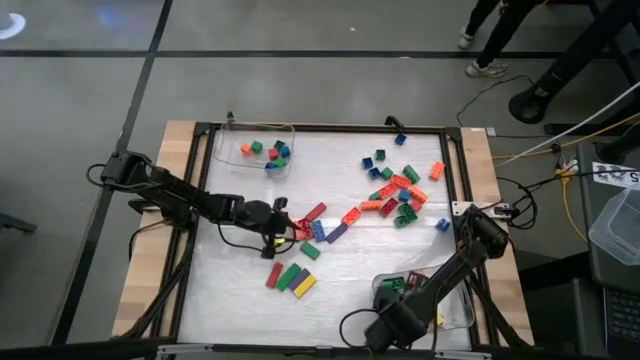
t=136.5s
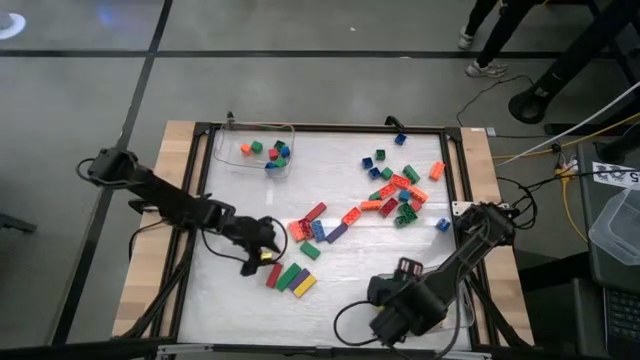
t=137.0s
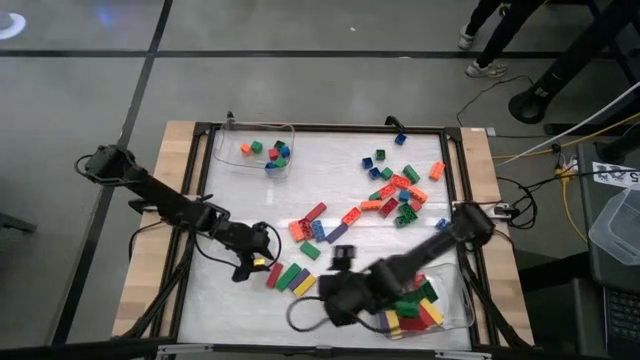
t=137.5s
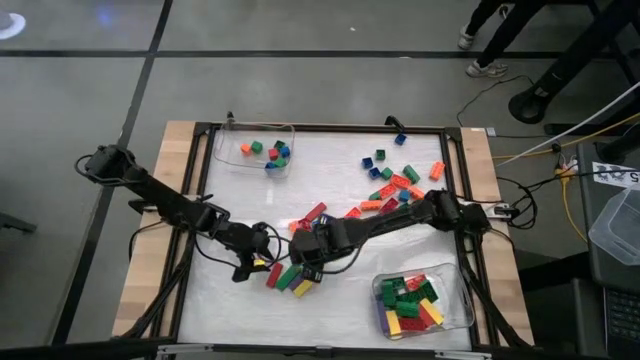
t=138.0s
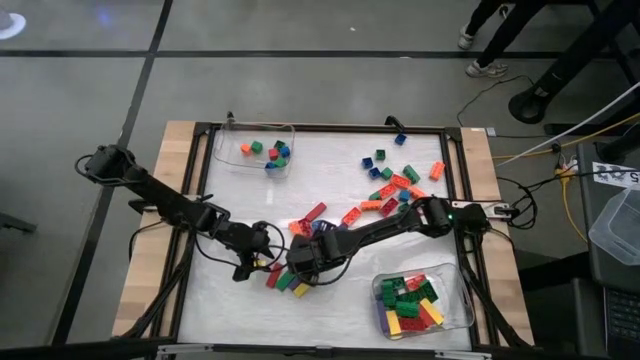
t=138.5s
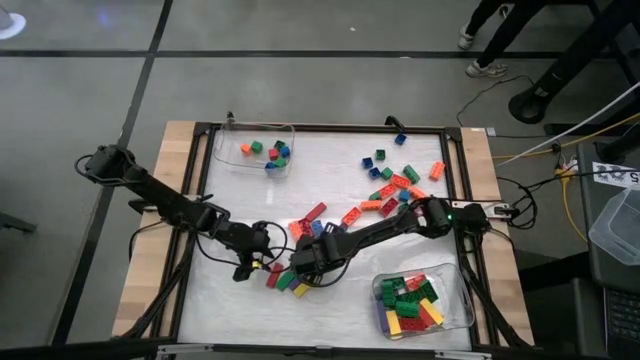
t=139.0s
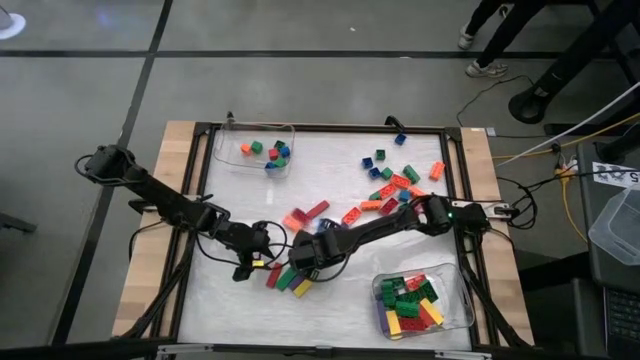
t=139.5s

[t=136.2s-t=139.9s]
Task: Sort blocks by size
Put the rectangular green block into the bottom transparent bin

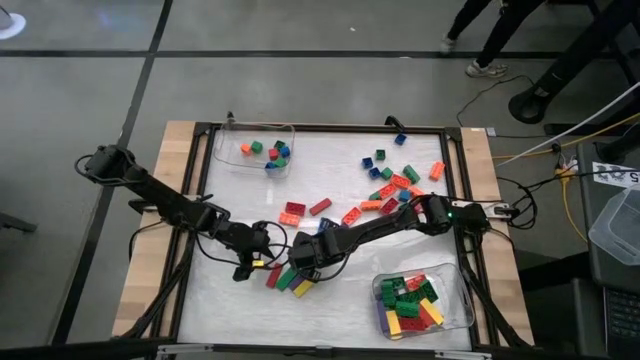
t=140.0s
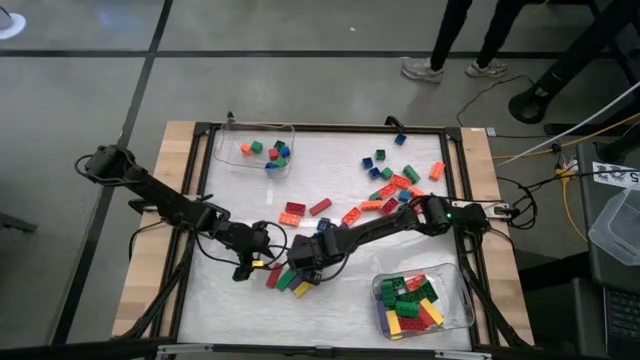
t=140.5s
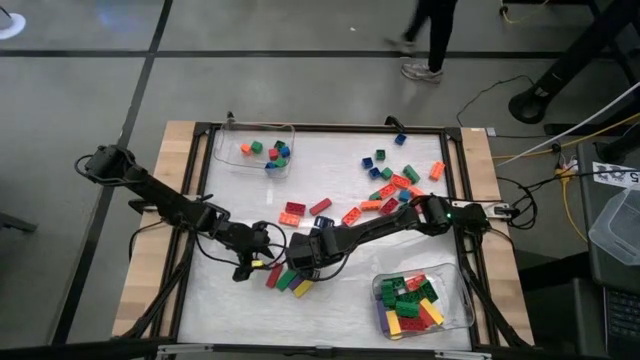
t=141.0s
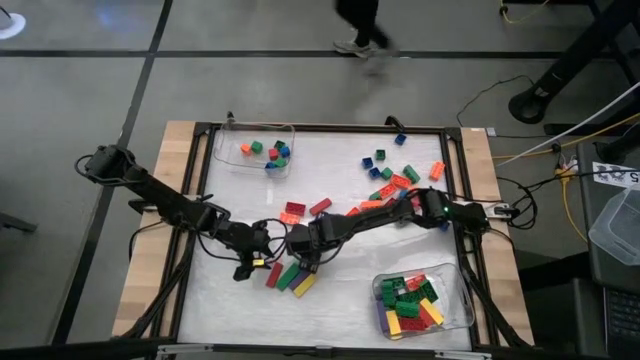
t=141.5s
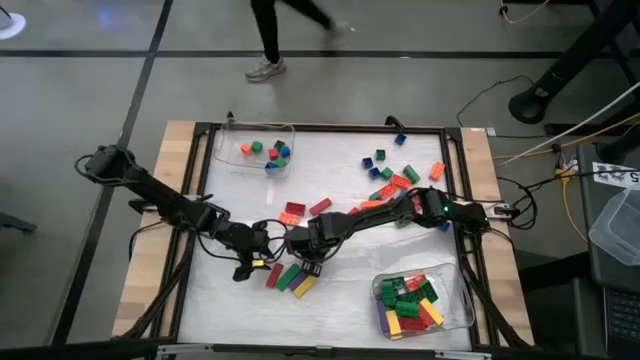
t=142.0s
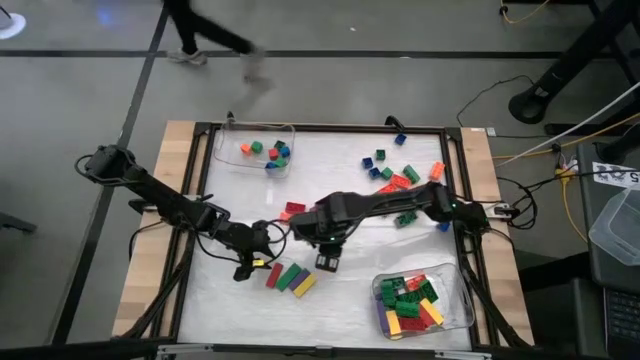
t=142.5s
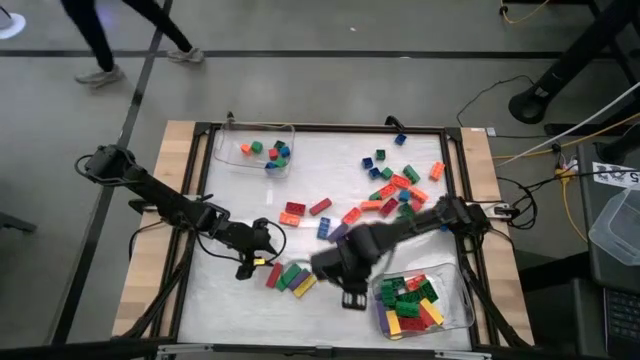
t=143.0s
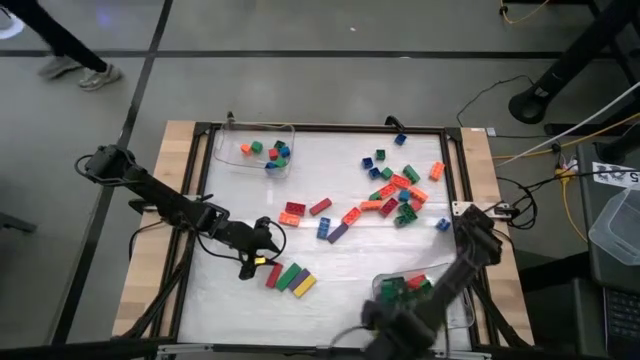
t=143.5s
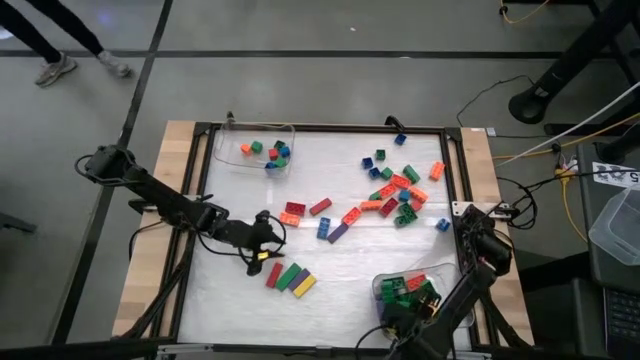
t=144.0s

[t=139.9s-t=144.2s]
Put the rectangular green block into the bottom transparent bin

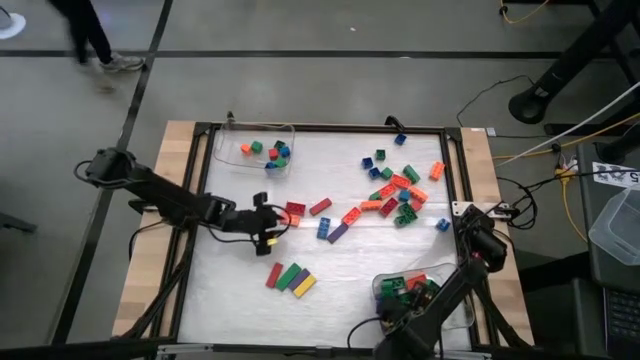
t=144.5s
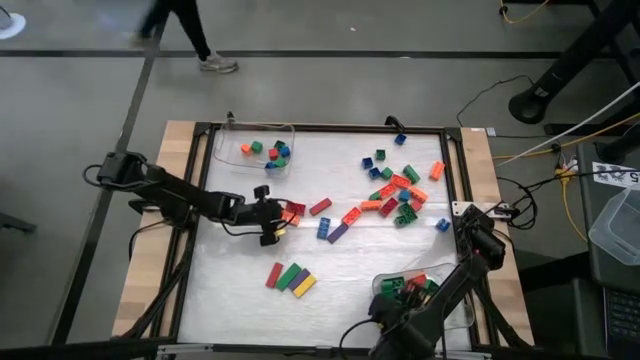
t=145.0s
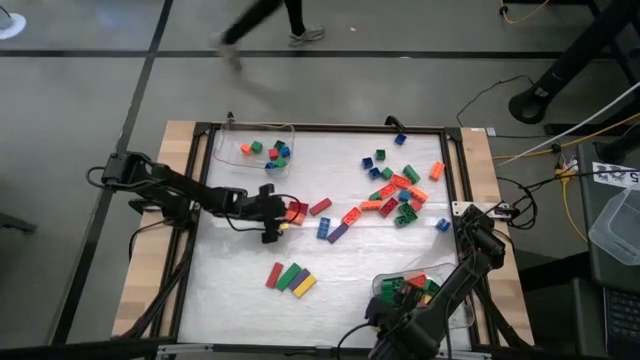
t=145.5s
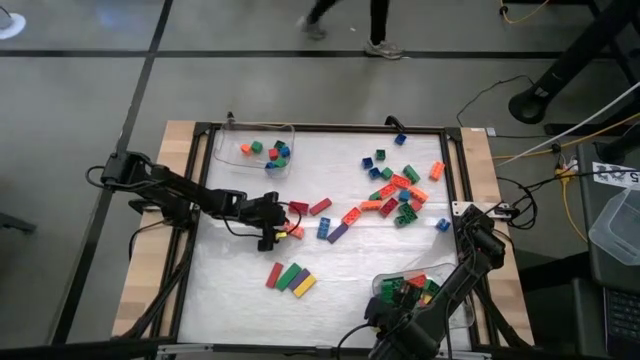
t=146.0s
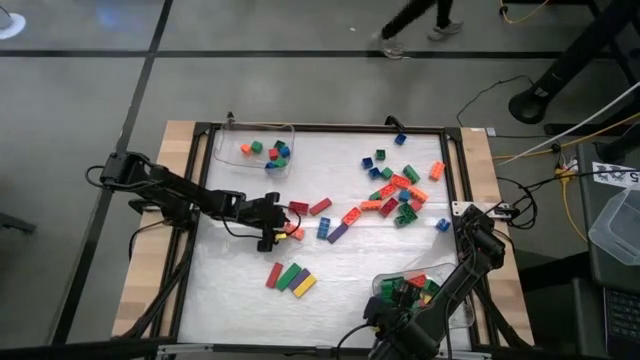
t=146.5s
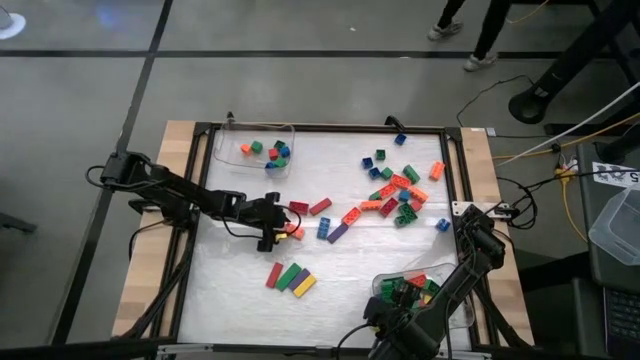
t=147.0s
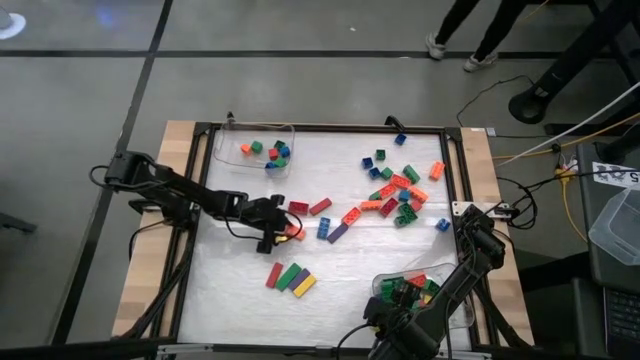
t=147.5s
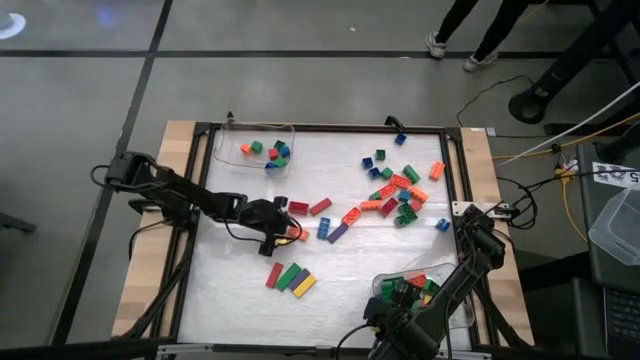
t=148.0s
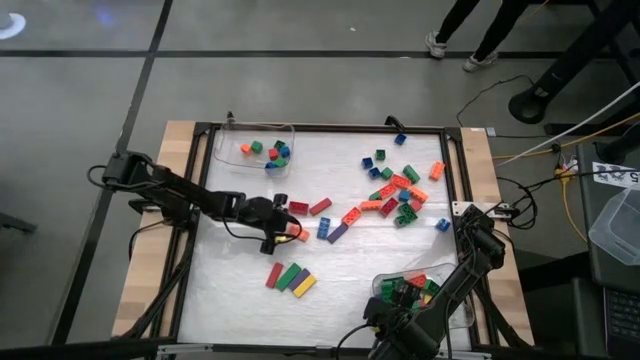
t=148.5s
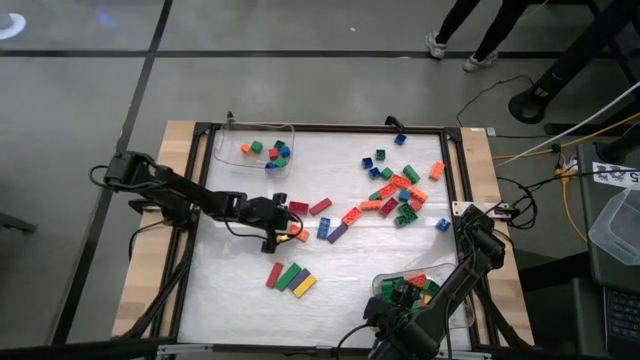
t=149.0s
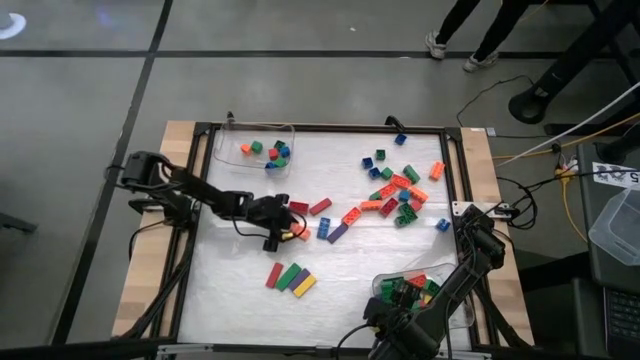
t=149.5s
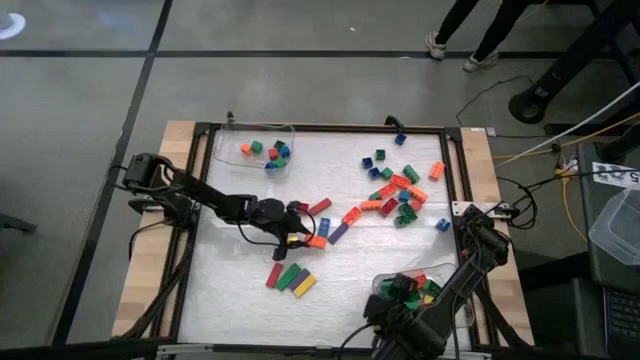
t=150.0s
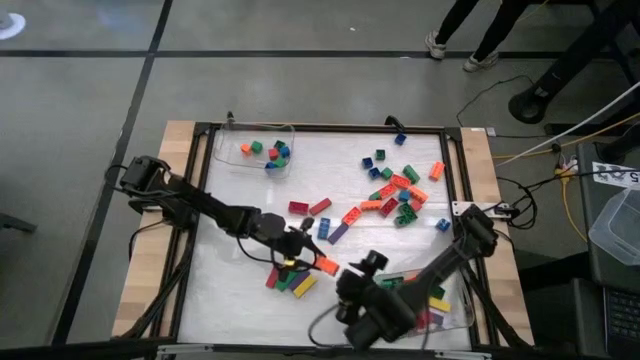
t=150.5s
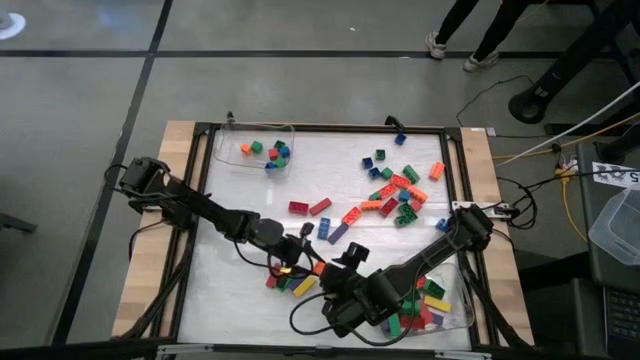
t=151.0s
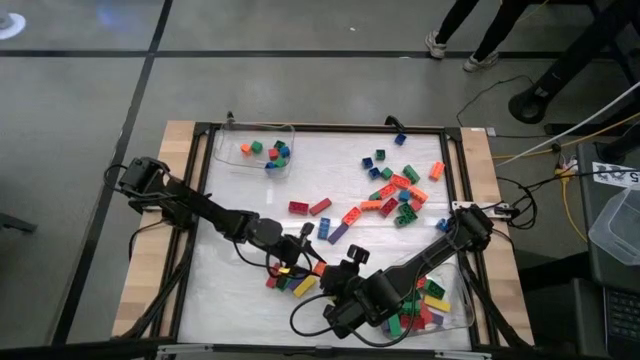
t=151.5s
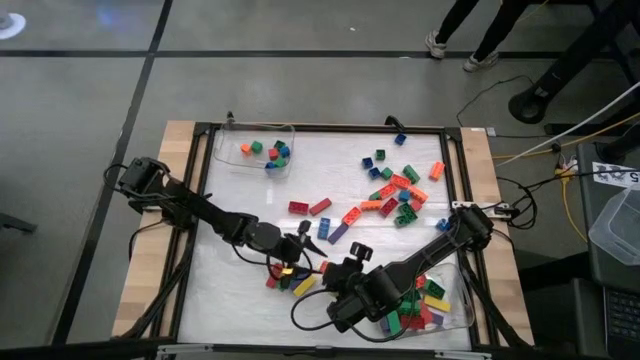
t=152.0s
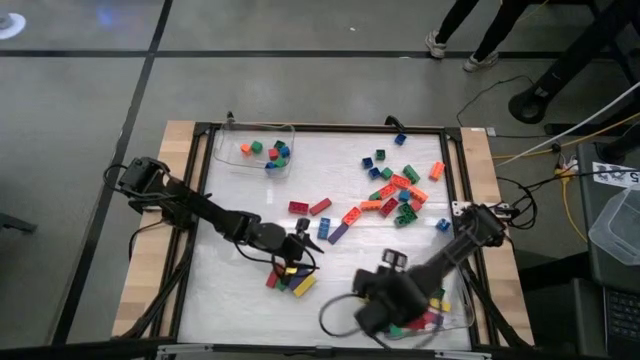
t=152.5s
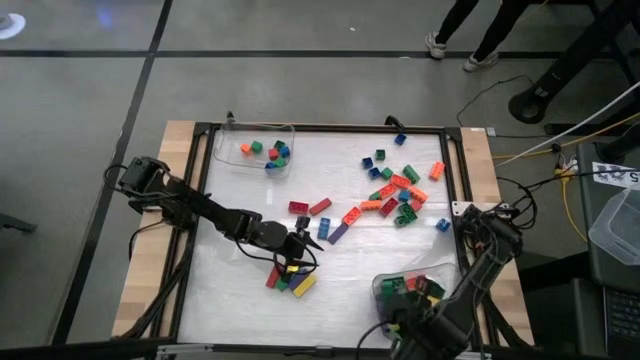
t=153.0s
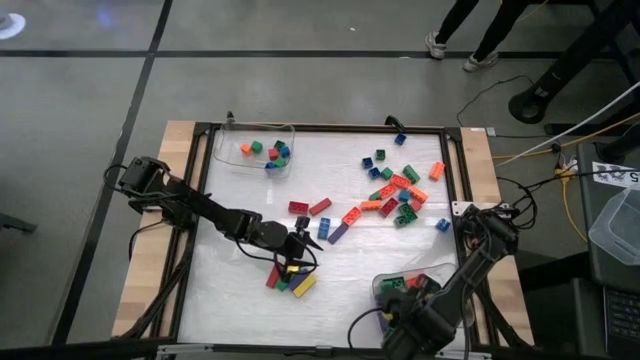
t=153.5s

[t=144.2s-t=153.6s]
Put the rectangular orange game piece into the bottom transparent bin

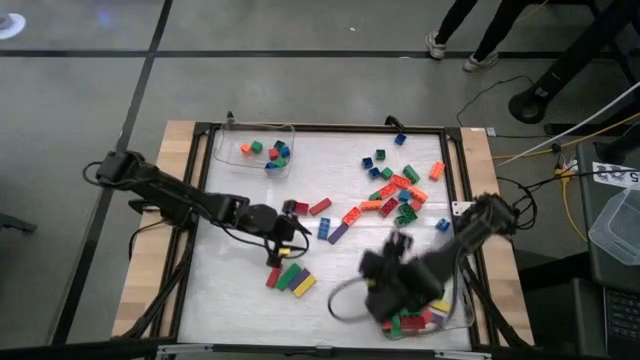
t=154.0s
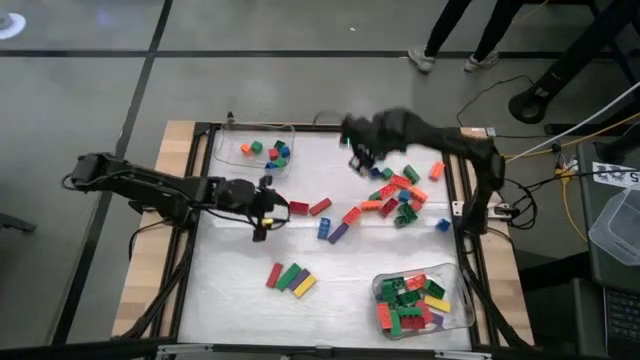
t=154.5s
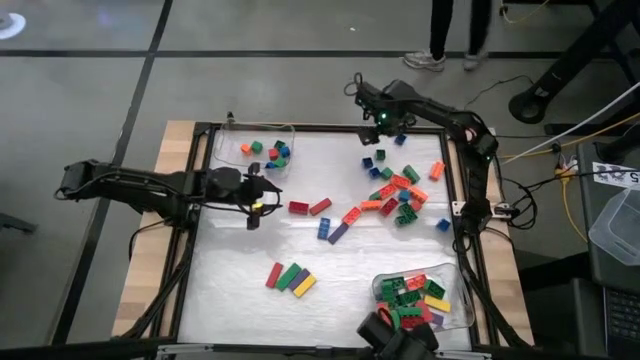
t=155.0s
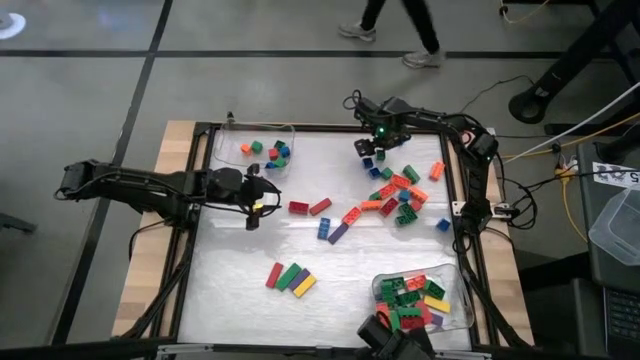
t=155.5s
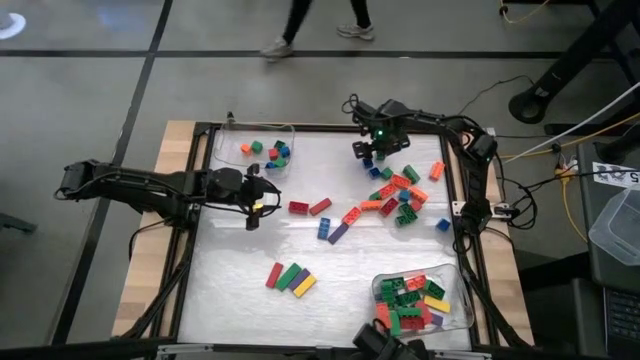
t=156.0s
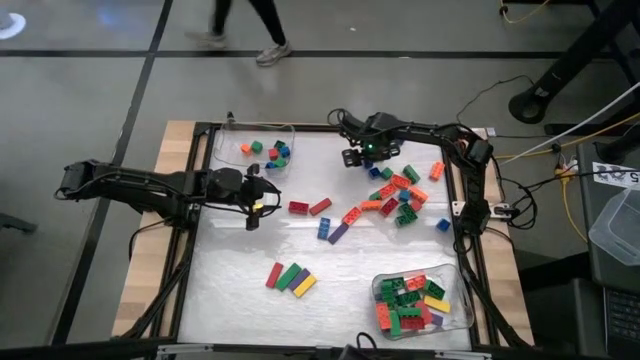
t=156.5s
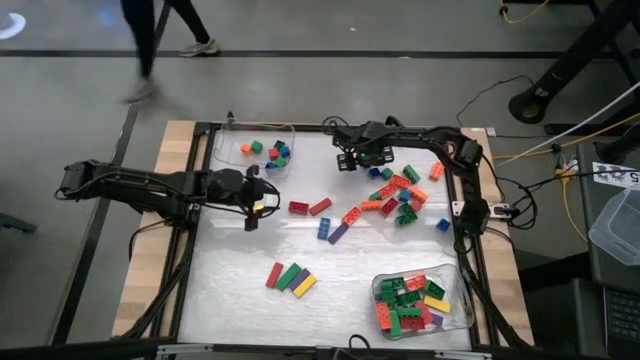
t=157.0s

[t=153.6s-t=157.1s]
Put the square blue game piece into the top transparent bin
